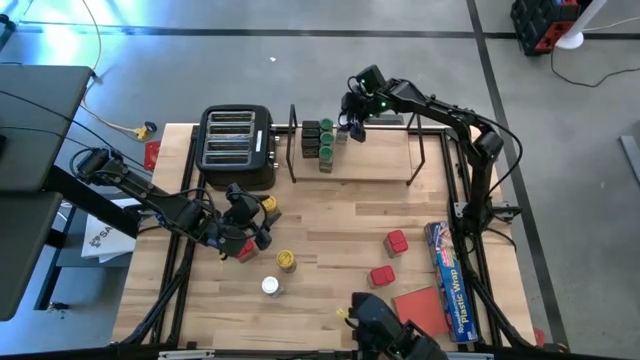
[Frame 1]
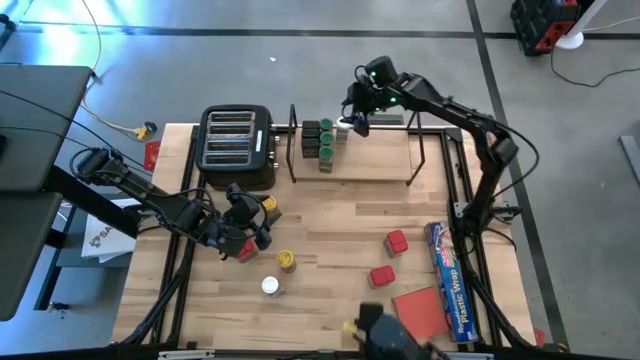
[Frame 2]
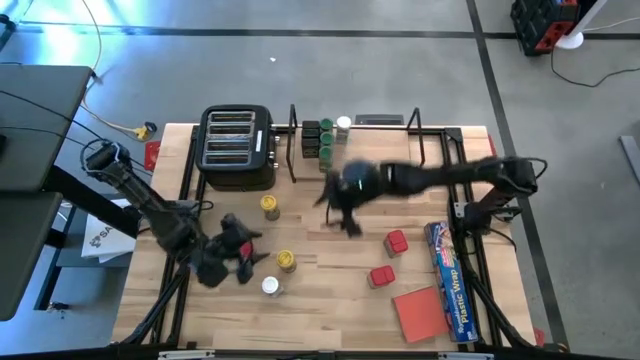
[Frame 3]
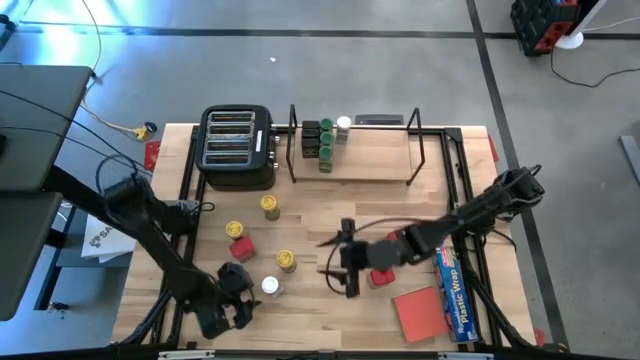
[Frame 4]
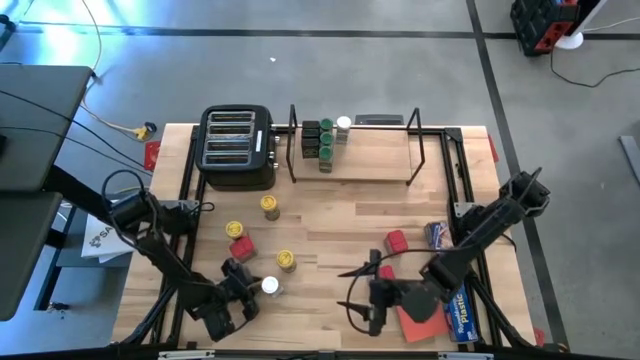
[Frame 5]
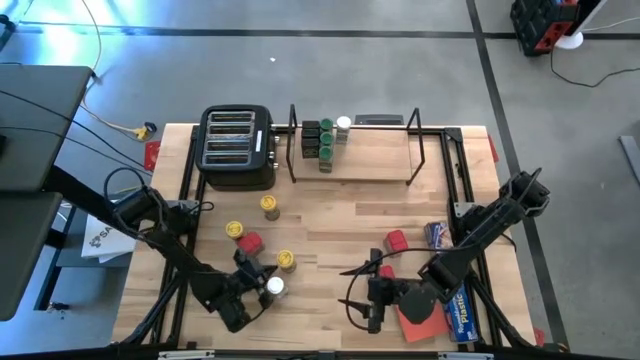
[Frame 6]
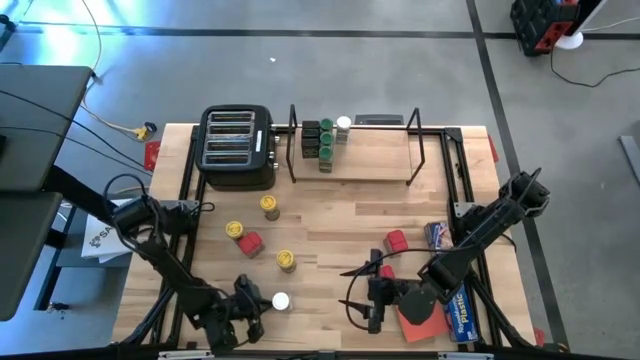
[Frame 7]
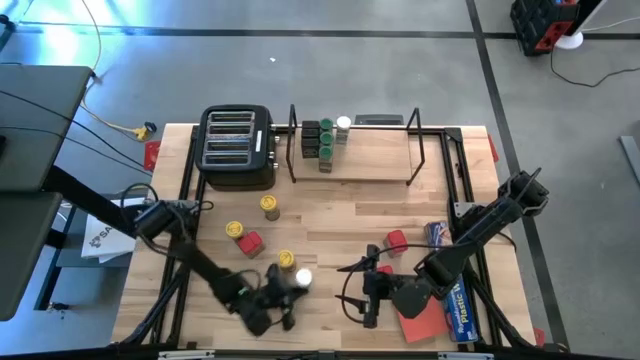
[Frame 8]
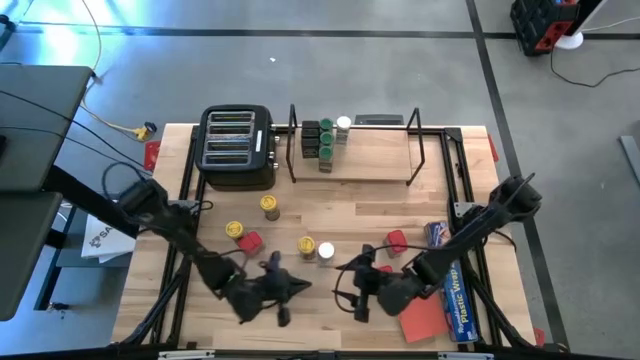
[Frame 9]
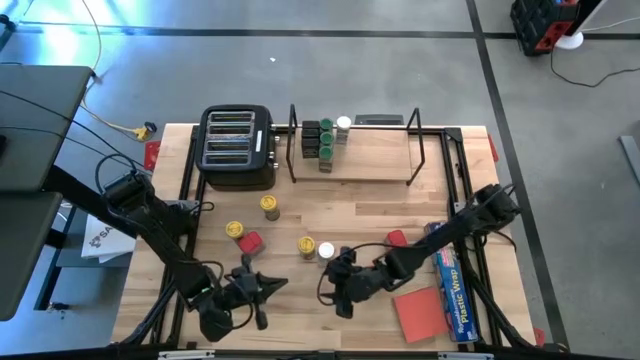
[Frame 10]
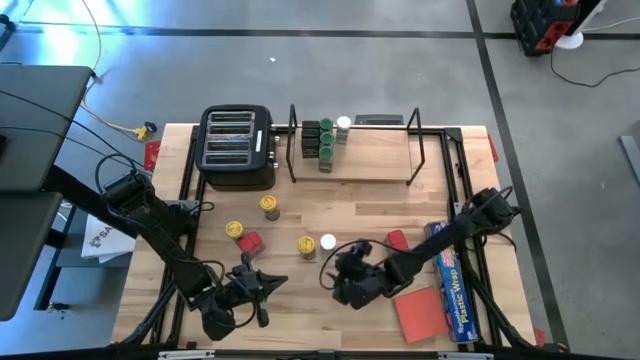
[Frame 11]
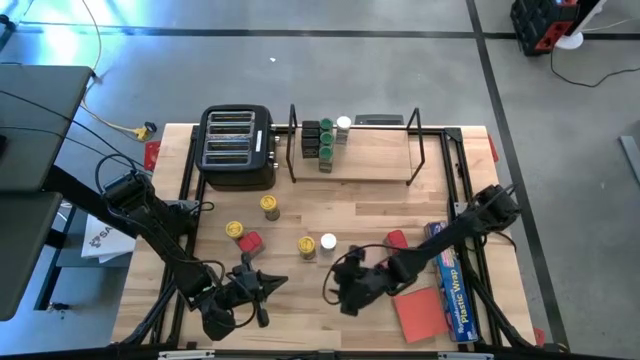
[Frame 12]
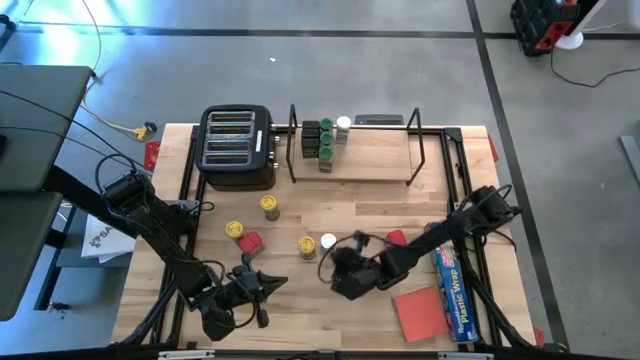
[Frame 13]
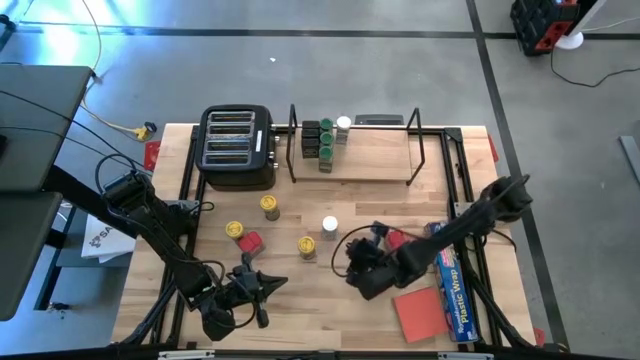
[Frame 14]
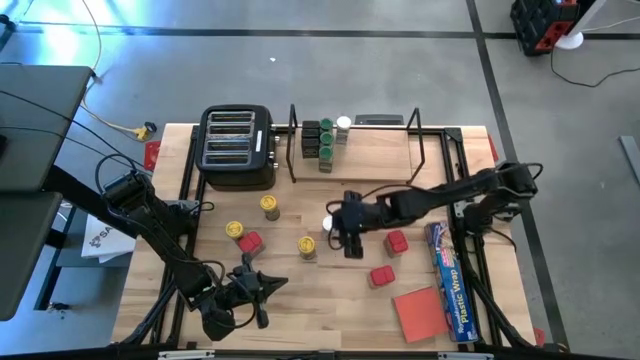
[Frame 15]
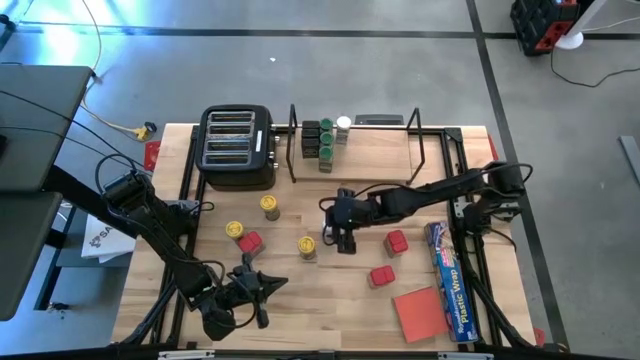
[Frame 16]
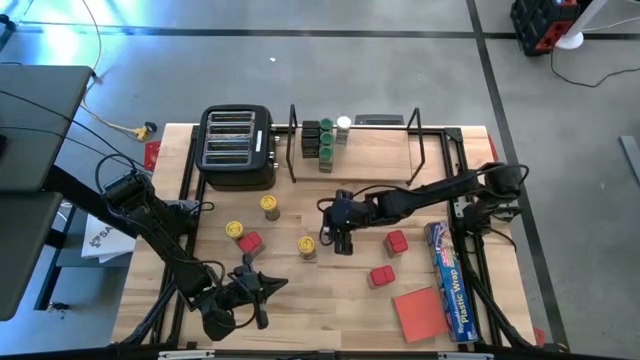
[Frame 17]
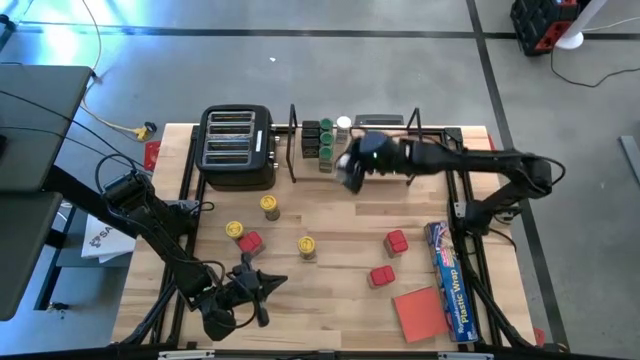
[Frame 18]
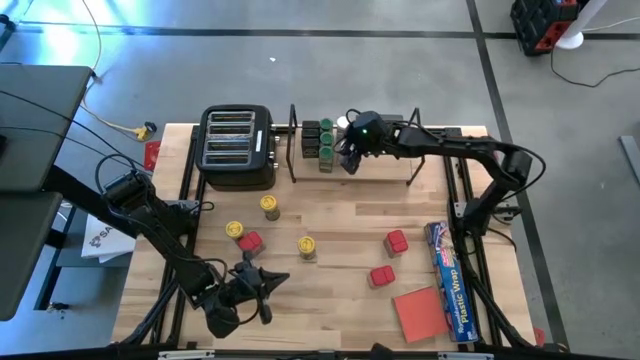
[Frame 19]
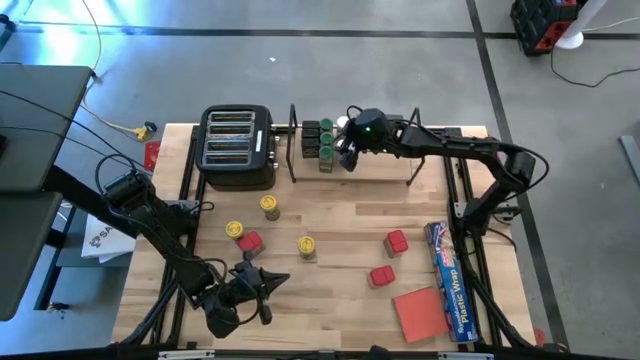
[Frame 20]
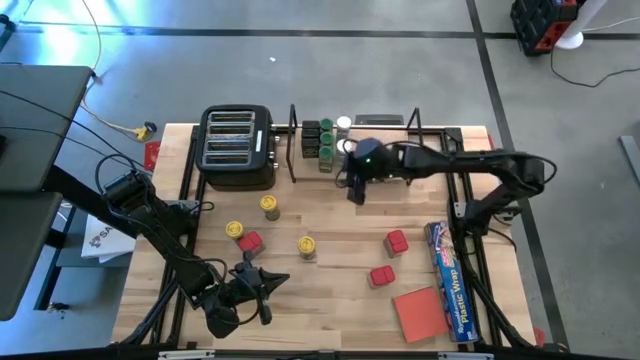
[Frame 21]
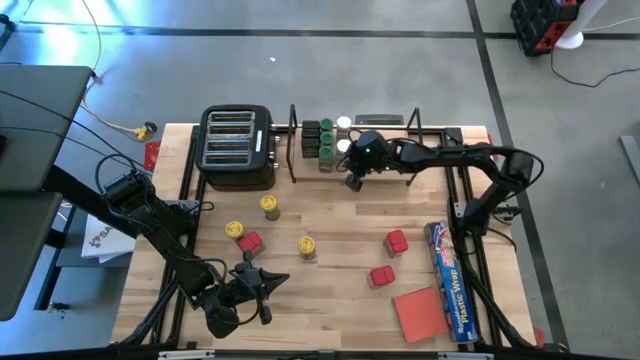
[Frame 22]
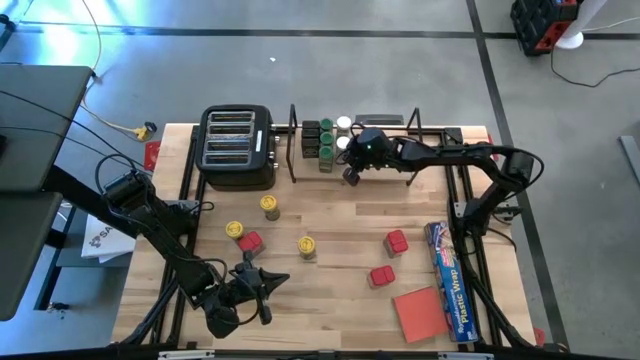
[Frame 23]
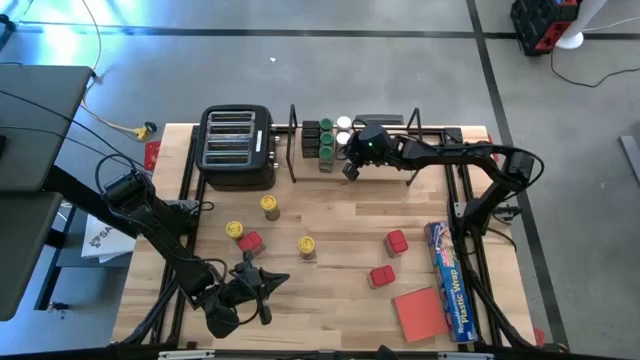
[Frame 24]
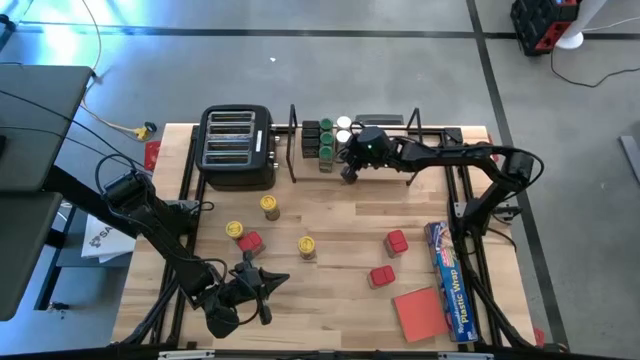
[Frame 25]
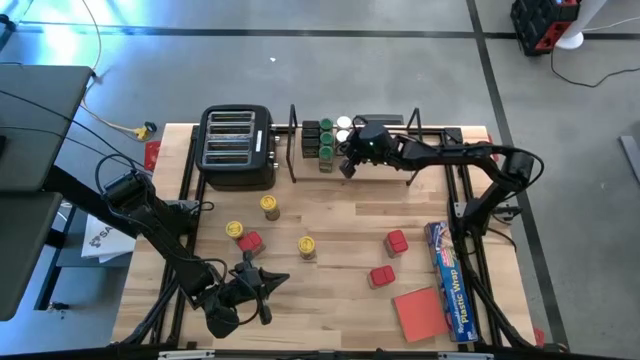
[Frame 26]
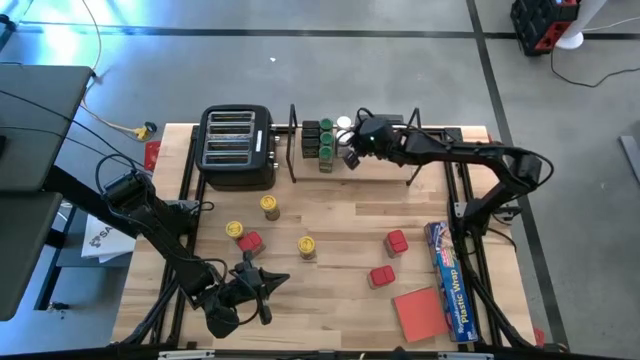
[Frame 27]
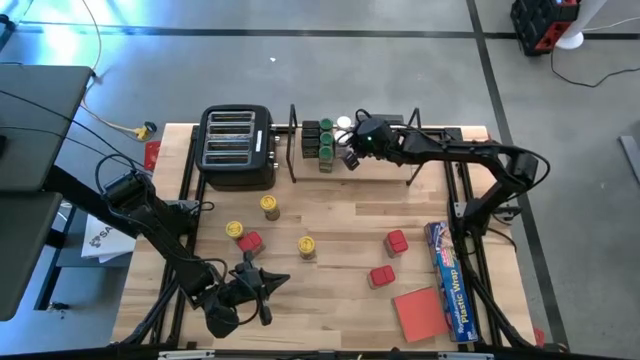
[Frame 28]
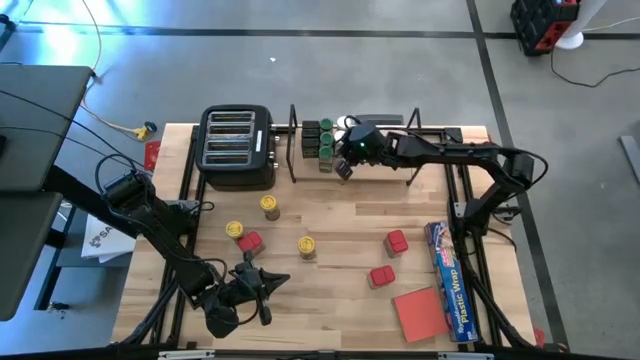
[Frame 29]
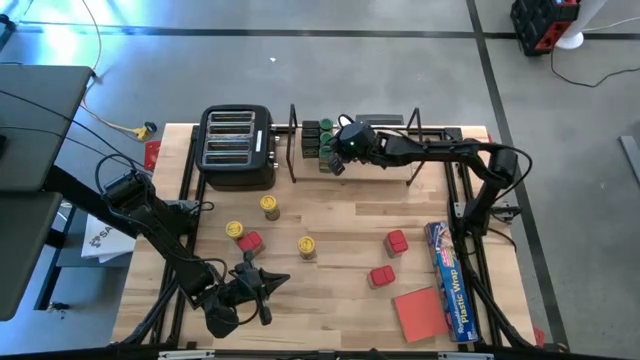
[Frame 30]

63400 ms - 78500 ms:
Task: Shelf spices
Put the white seasoning bottle on the shelf aligned with the other white seasoning bottle

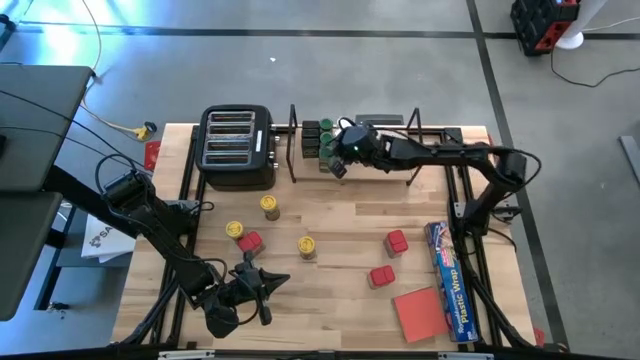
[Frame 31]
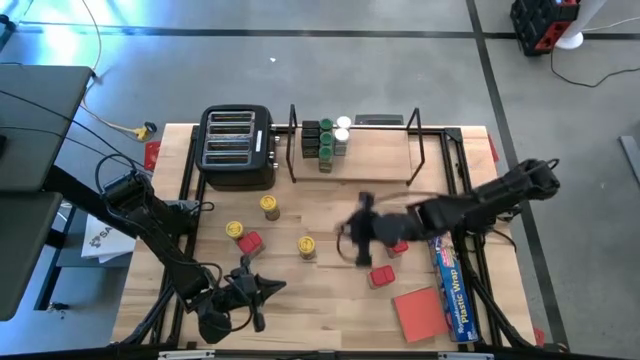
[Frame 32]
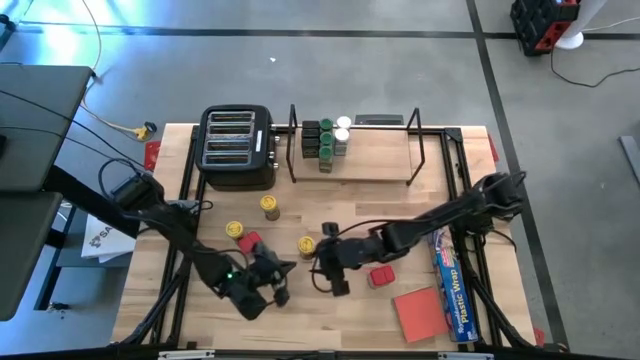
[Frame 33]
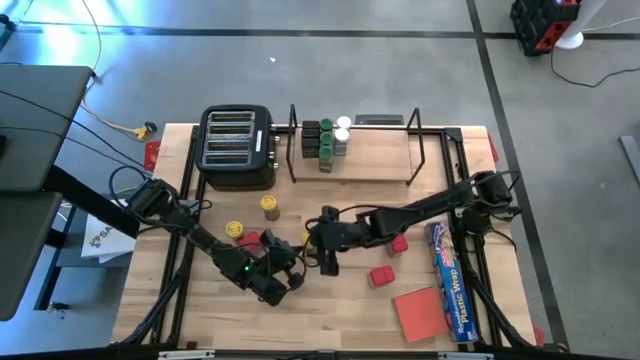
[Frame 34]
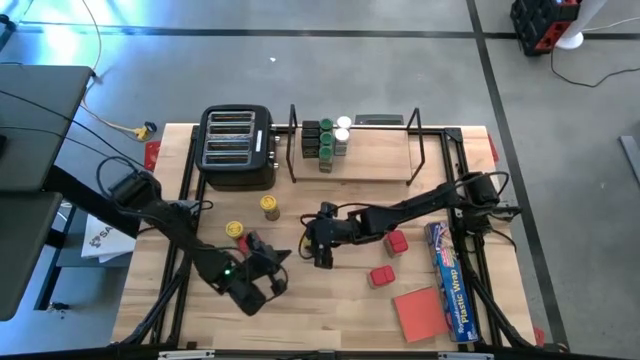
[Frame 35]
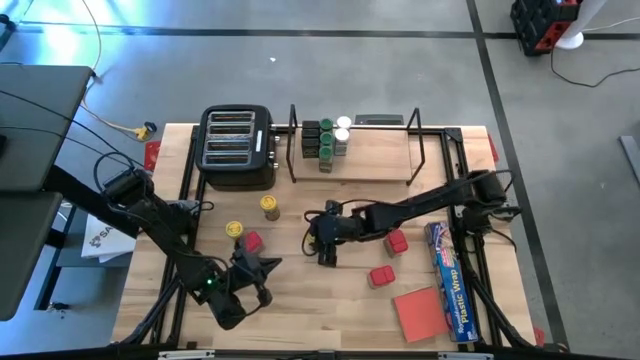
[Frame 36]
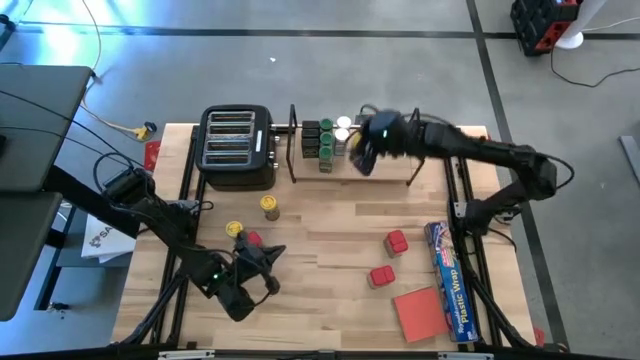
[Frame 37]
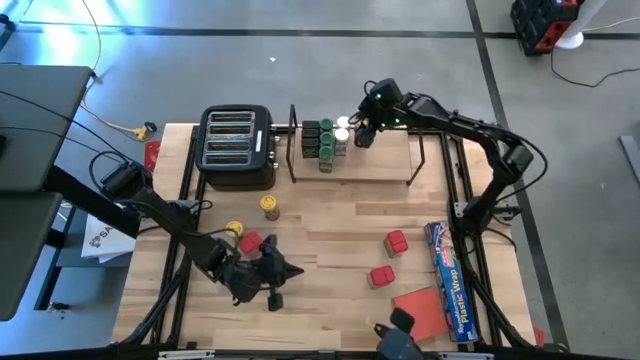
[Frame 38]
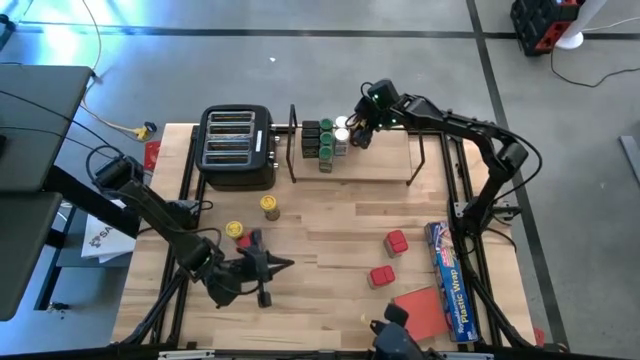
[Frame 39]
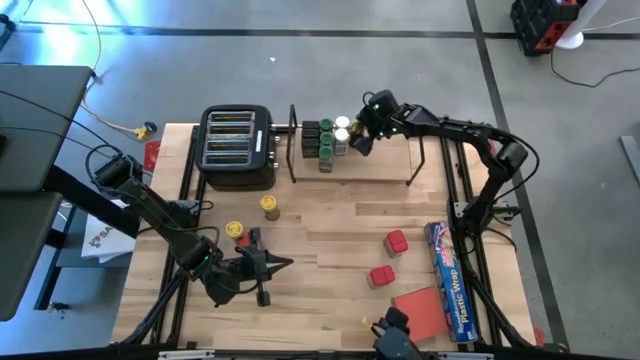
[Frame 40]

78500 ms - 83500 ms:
Put the bottom right yellow seasoning bottle on the shelf

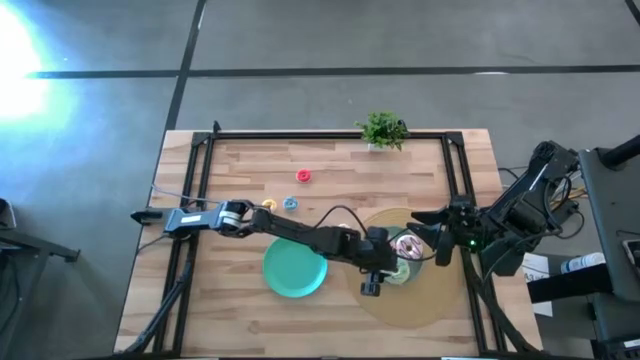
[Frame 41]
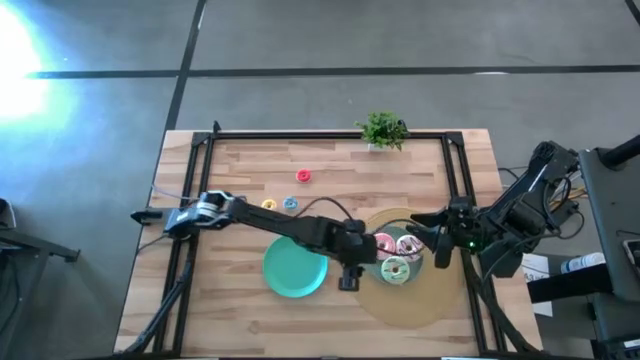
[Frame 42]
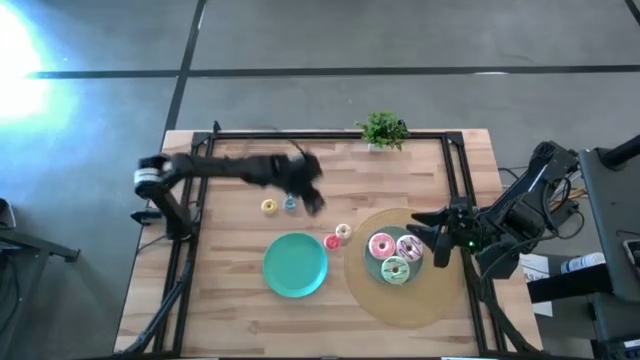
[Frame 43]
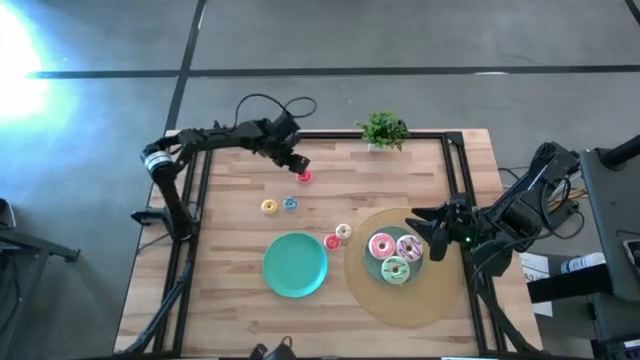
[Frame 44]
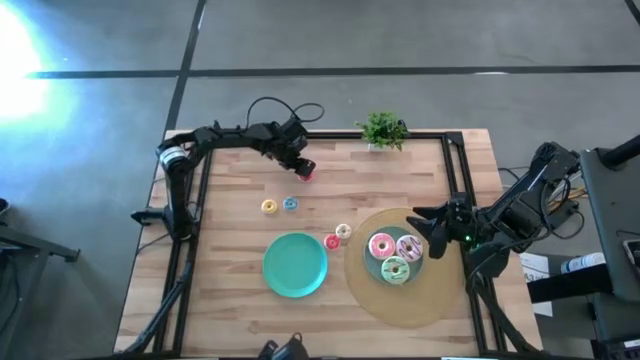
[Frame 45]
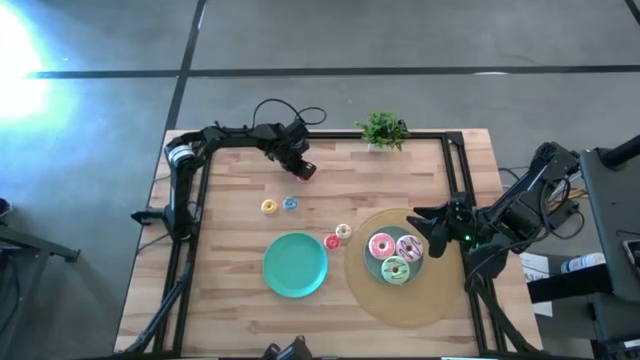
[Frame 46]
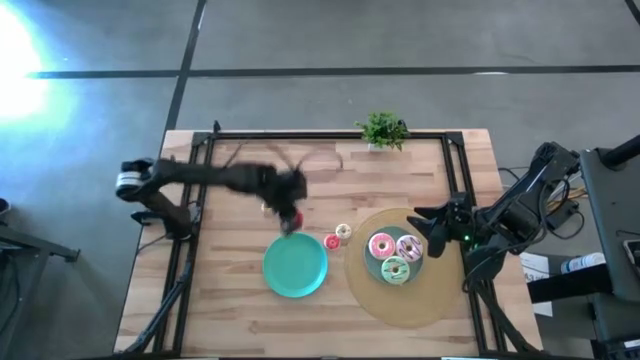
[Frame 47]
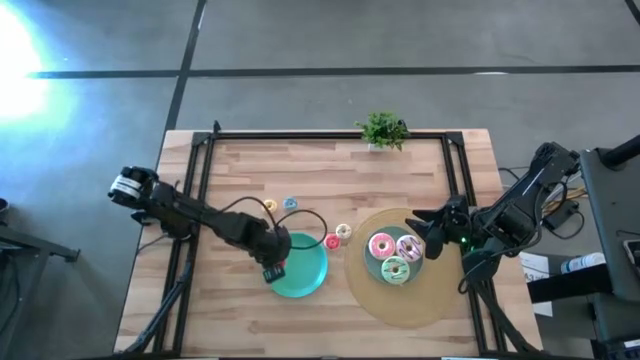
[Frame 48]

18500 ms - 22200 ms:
Task: Pick & Place donuts
Put the top small red donut on the blue plate
